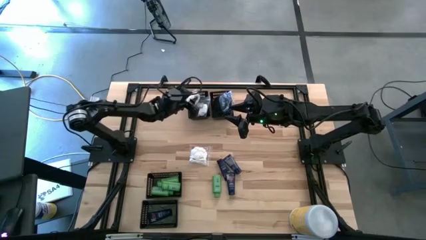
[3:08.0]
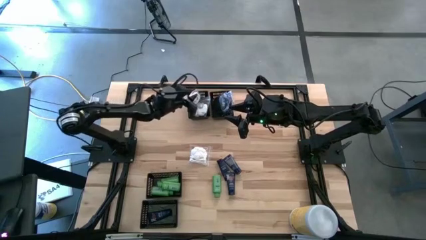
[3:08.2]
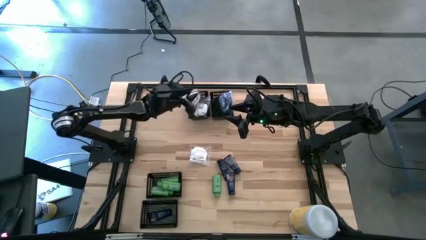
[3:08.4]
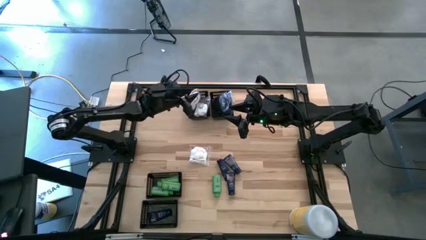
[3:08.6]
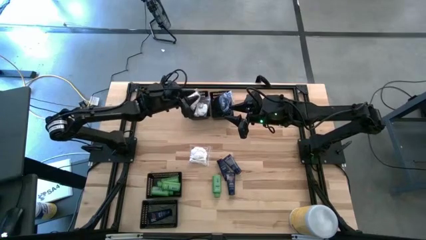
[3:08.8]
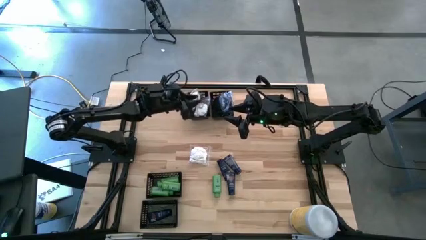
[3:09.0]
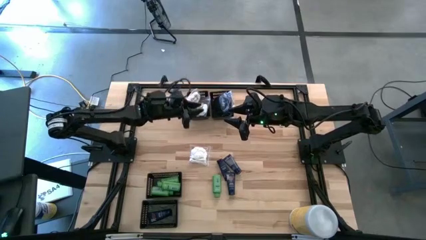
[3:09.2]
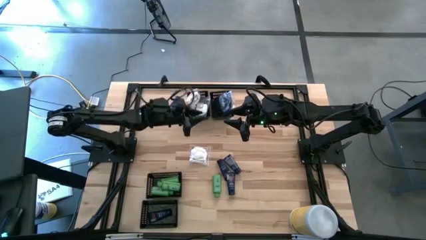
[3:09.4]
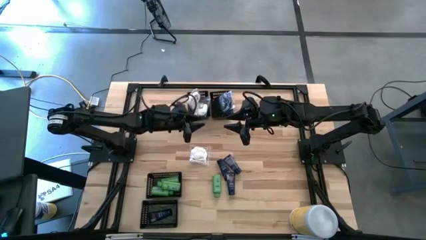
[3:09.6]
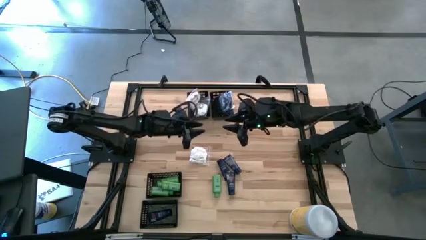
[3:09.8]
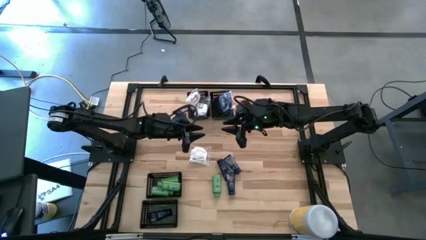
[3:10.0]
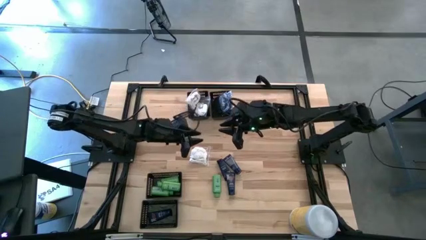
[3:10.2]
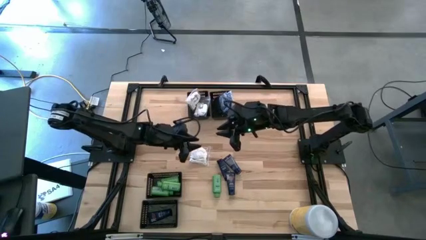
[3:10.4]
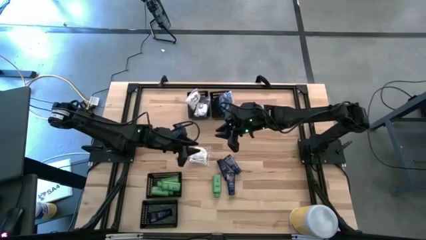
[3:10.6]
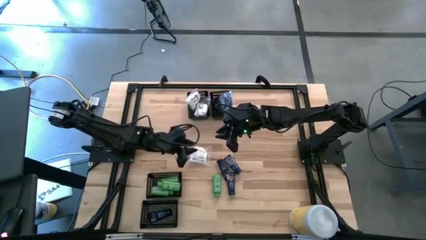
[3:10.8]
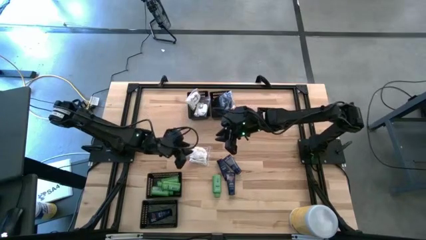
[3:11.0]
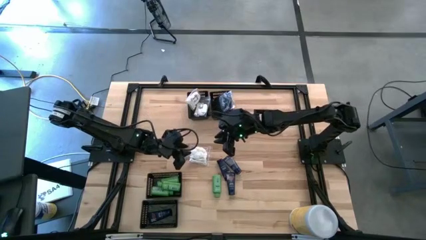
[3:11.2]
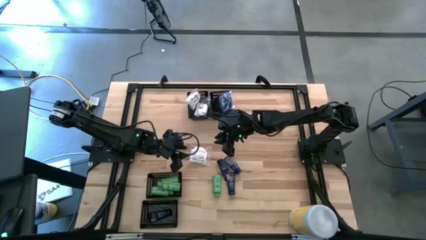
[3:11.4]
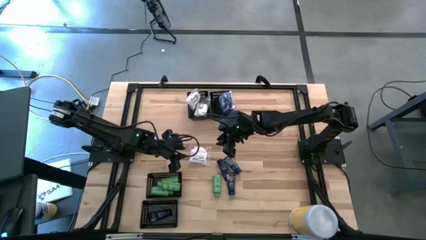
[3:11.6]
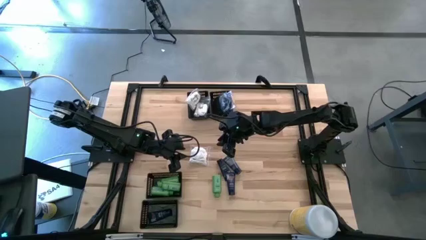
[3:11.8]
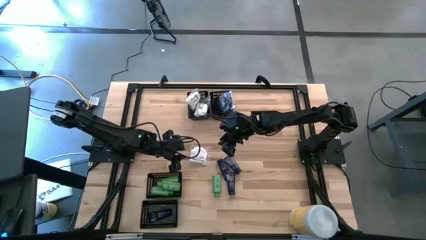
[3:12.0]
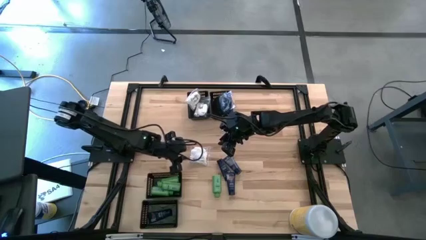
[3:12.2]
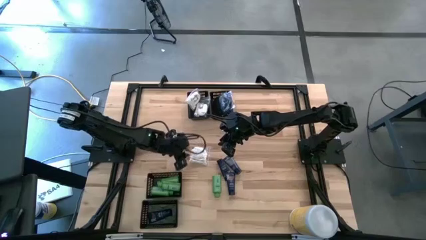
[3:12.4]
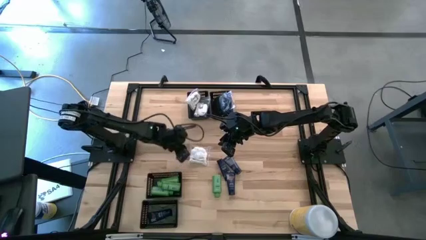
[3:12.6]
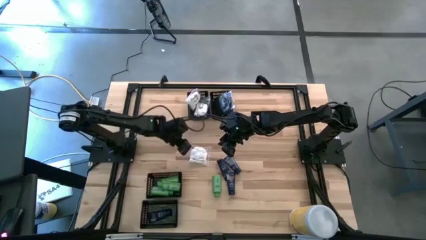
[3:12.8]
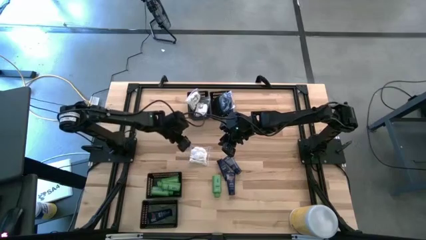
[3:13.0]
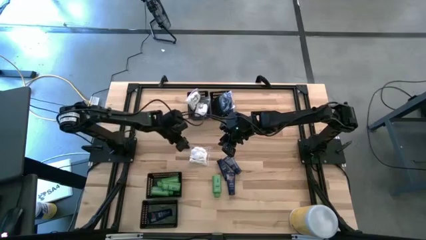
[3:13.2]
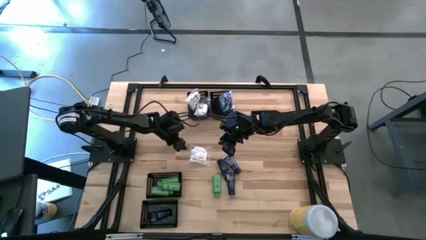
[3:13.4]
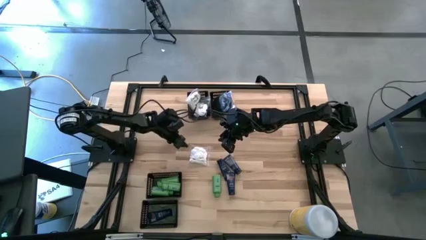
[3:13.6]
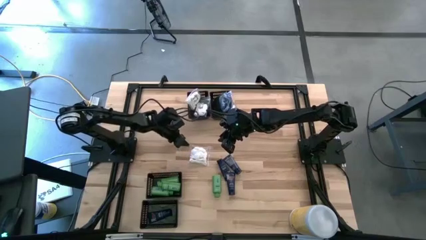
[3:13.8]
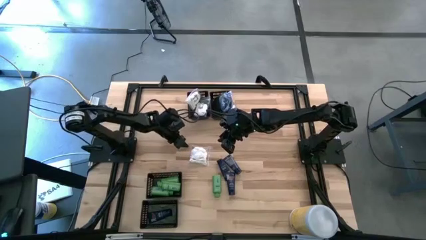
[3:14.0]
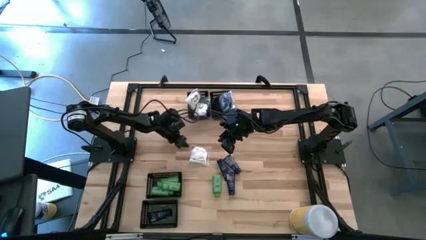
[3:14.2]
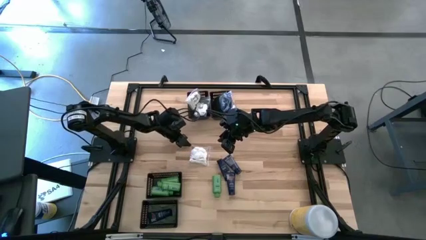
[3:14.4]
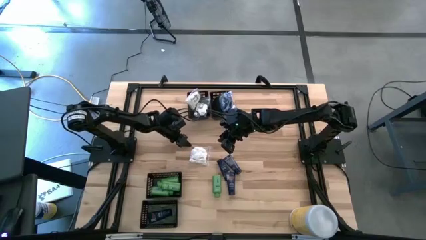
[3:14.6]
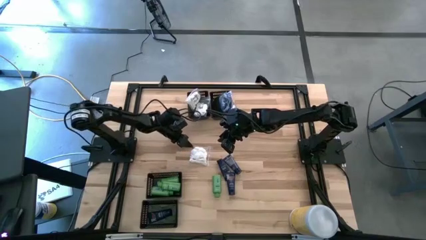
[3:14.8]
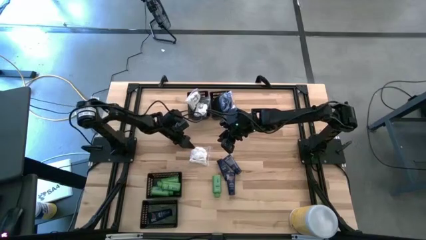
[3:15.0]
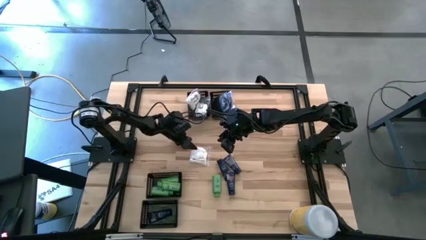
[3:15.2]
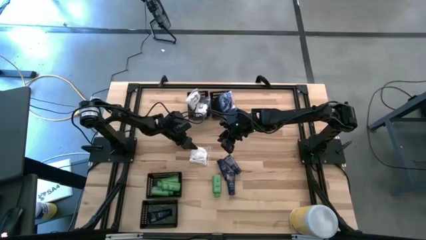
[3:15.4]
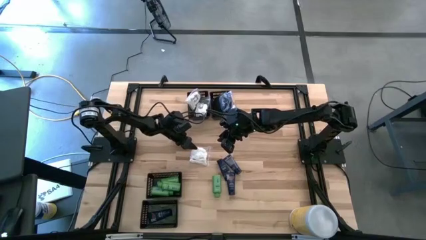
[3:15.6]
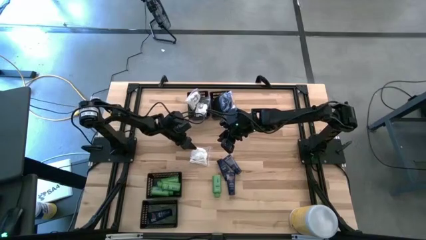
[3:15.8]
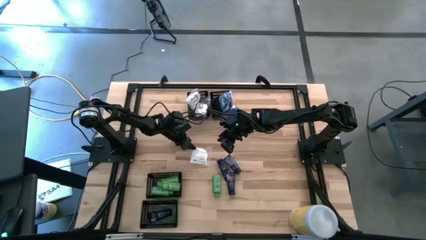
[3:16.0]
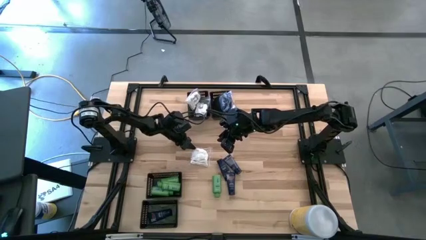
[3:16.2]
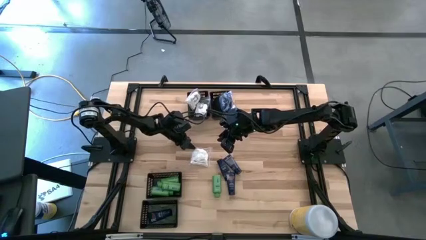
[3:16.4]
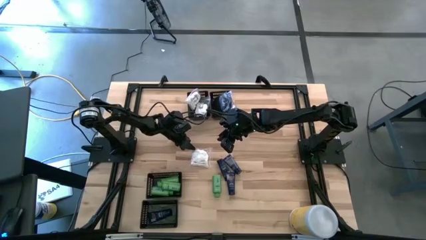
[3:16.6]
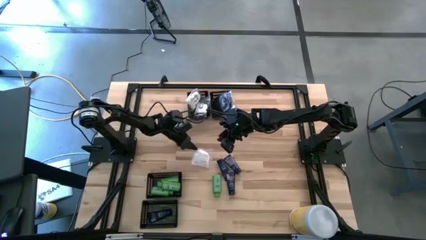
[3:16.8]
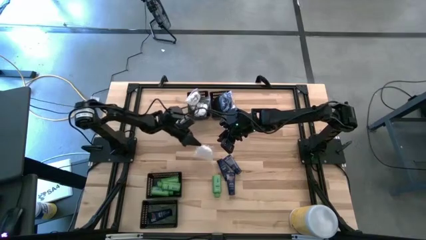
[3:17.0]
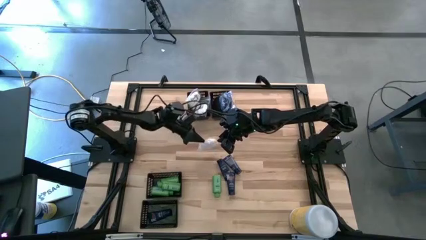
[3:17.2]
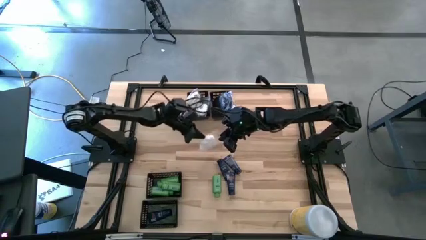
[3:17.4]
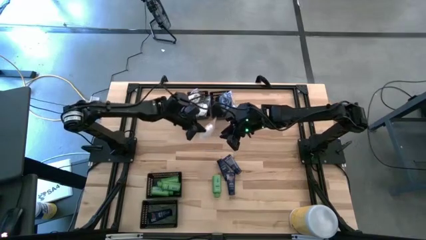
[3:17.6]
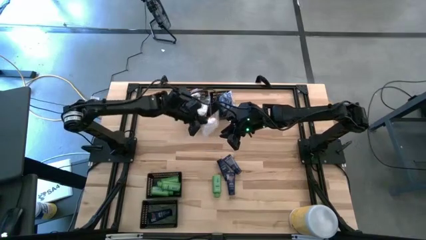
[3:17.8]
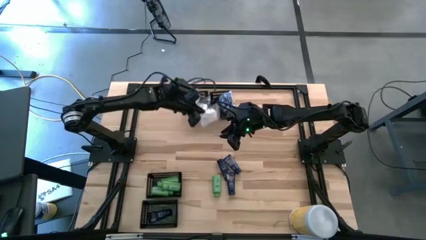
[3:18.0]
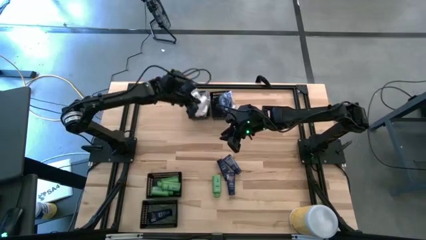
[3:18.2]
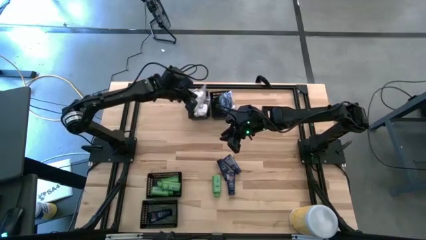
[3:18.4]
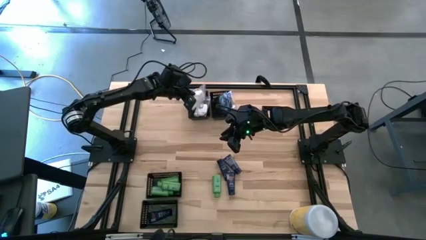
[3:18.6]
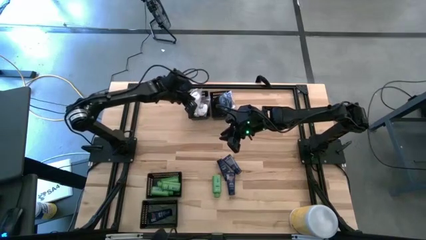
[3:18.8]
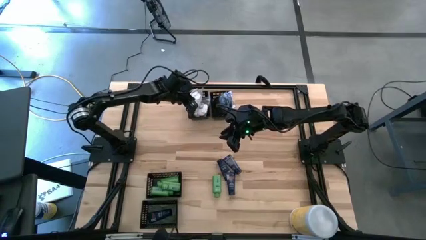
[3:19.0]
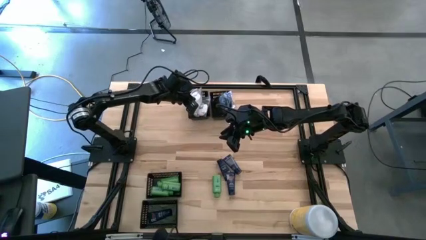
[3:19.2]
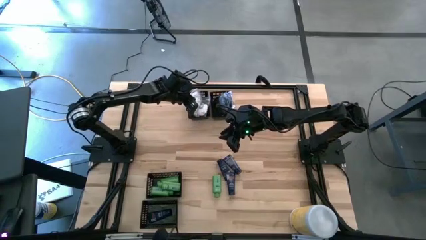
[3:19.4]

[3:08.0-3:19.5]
Task: Pick & Place Travel size toiletries
Put the white cotton pack into the top middle basket
